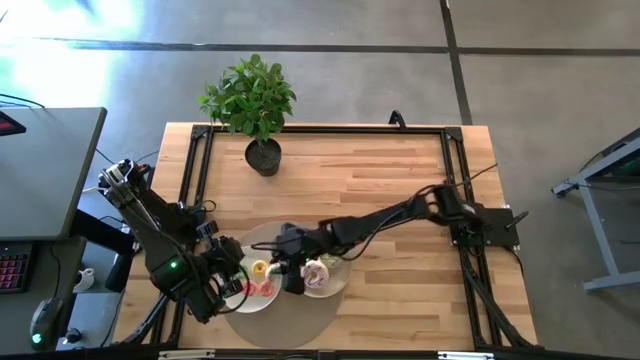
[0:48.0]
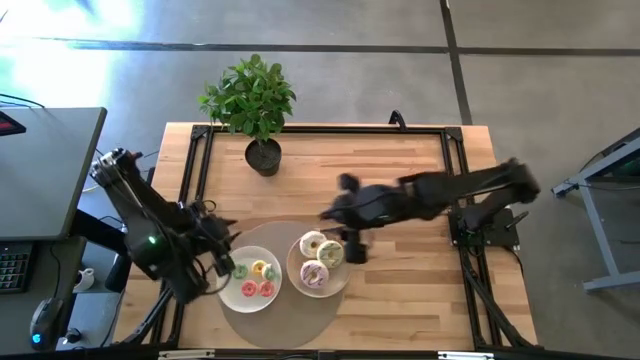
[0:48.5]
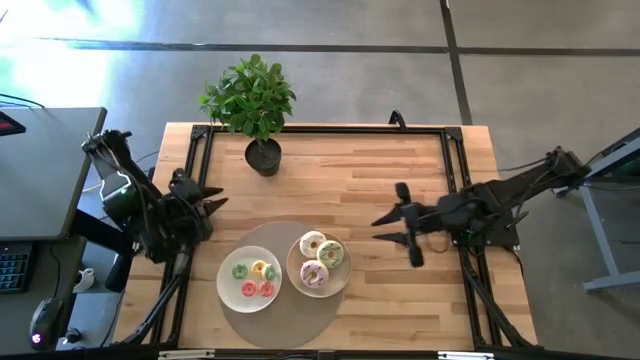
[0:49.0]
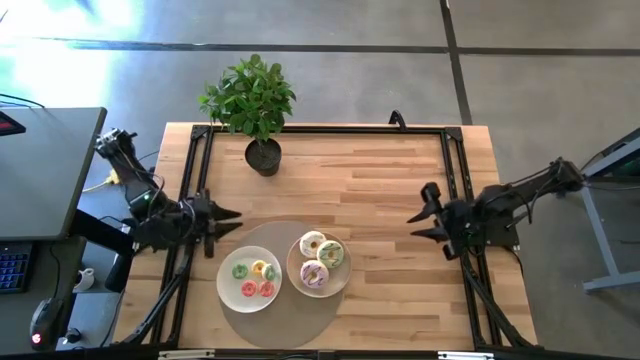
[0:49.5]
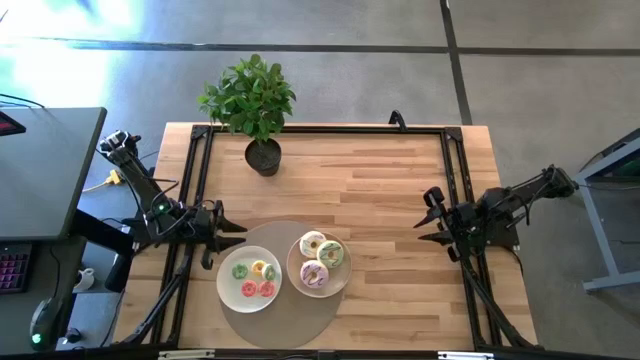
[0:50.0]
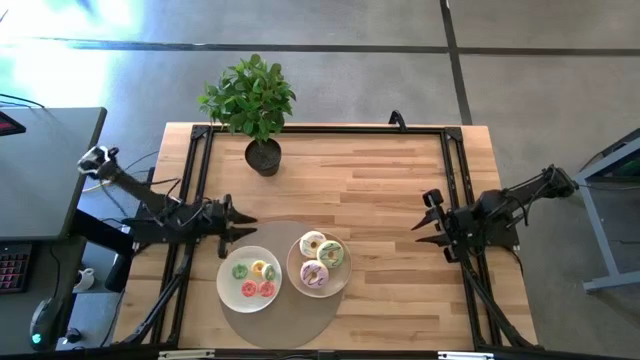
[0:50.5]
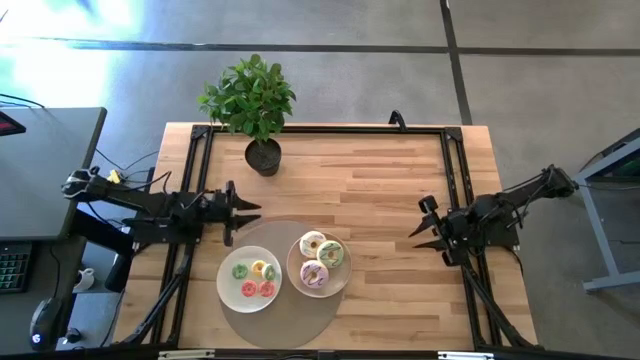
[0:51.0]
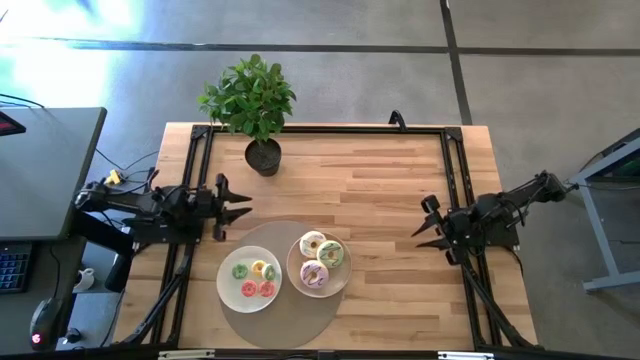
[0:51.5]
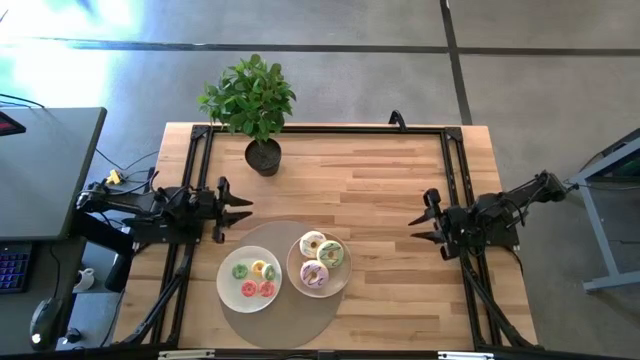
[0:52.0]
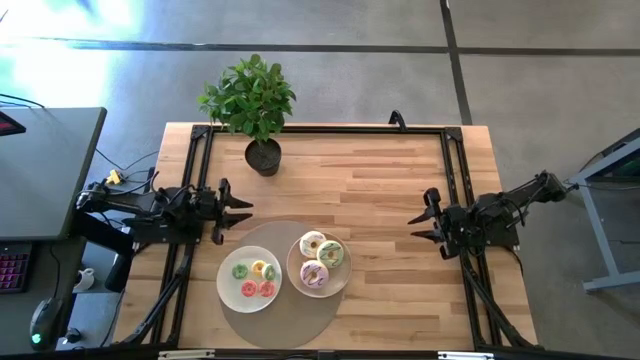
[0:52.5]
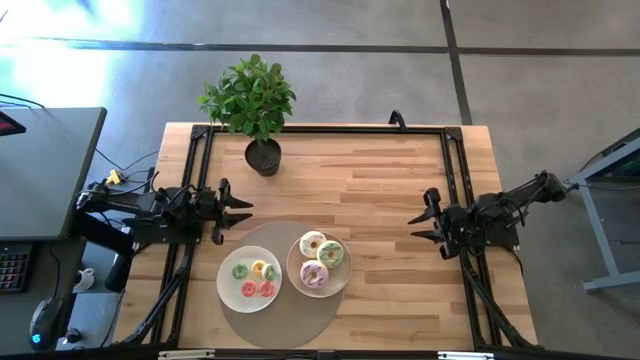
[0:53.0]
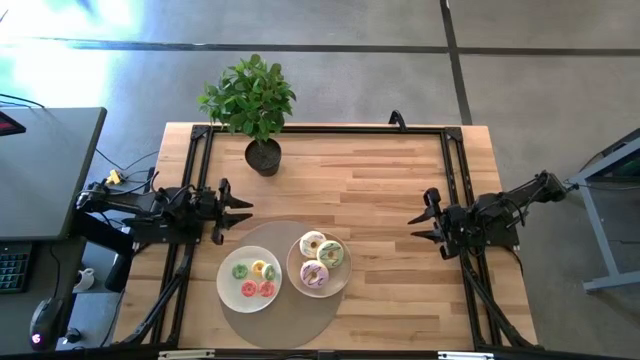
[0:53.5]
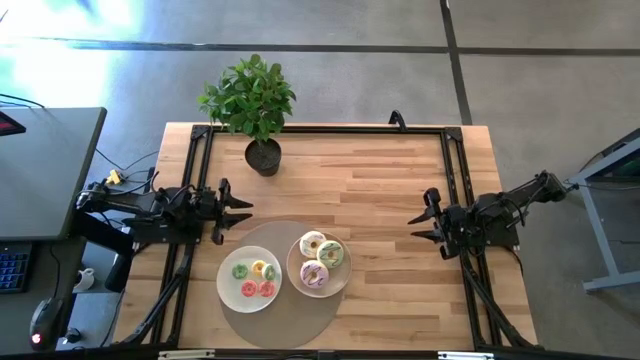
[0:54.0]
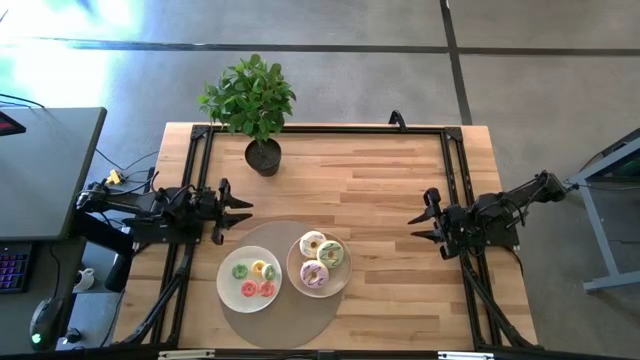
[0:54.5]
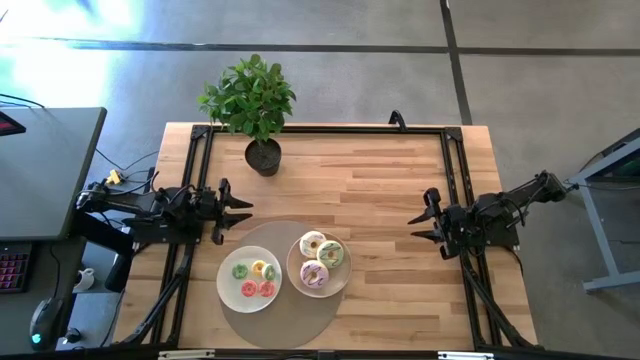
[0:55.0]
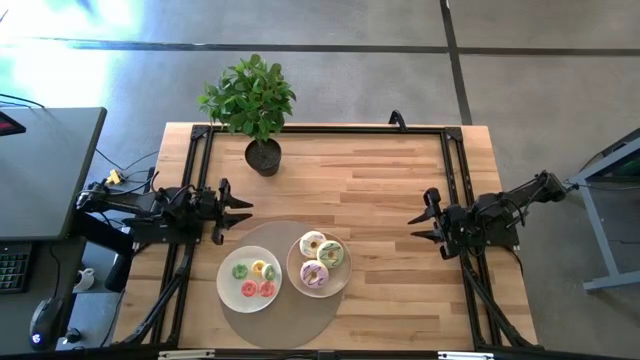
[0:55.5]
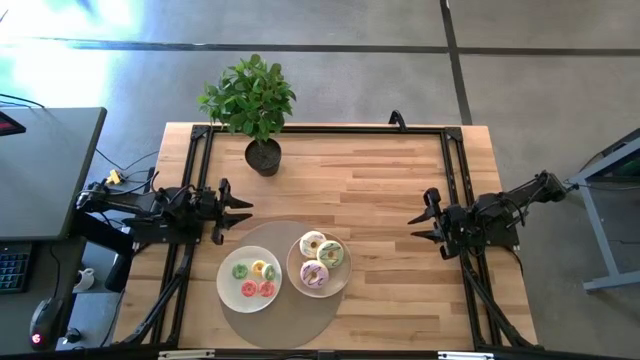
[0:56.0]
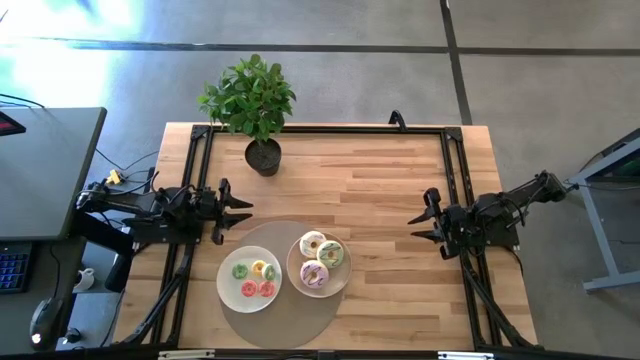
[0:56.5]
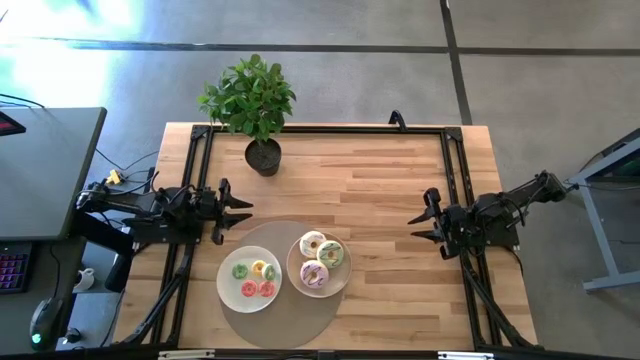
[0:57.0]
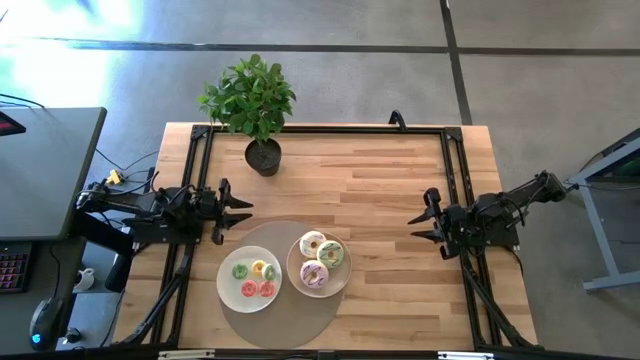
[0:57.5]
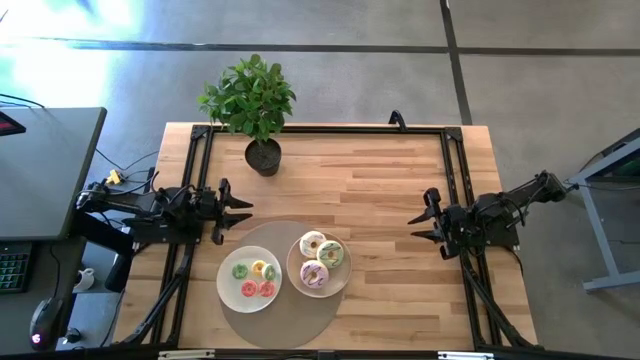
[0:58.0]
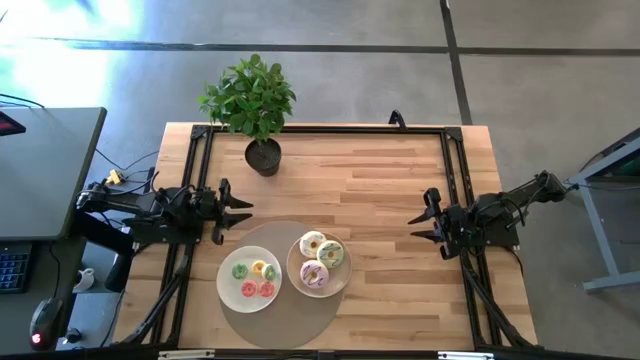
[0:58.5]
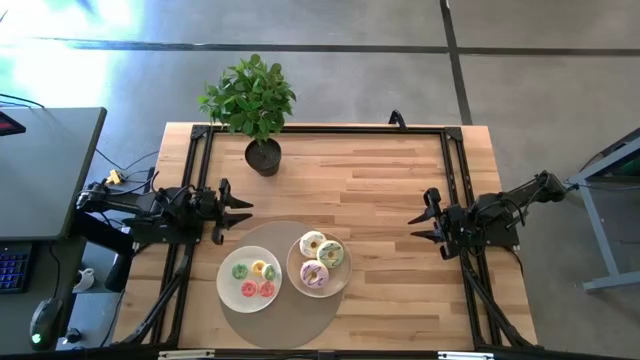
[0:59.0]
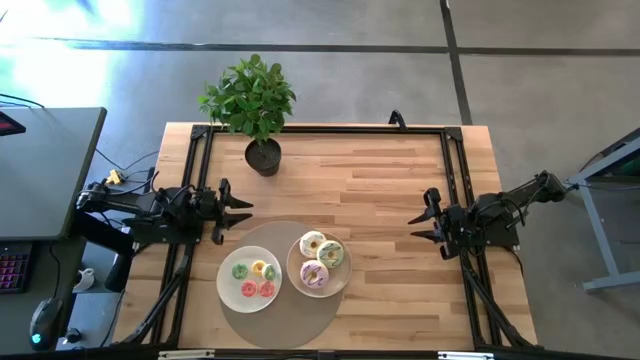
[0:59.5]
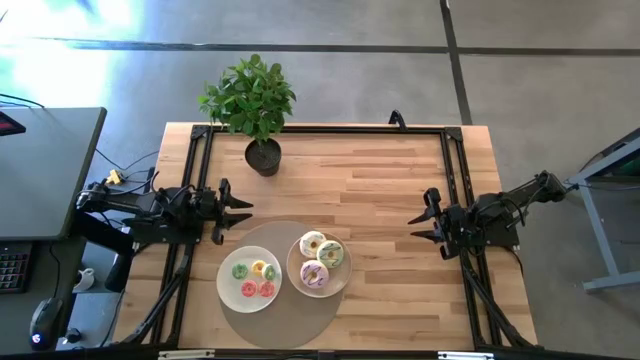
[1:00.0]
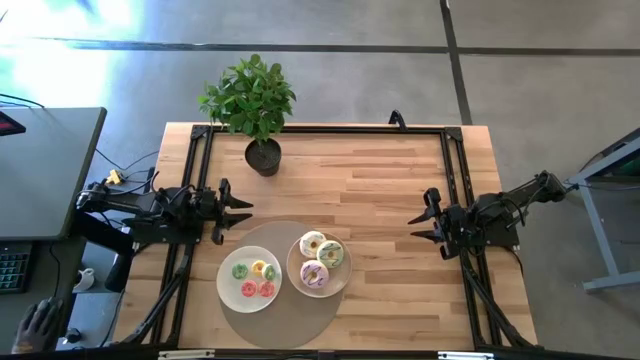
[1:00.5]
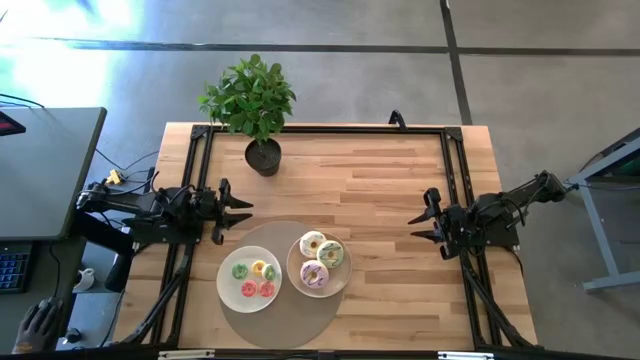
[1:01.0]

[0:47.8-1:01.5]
Task: Pick & Place donuts
Return to Home Position

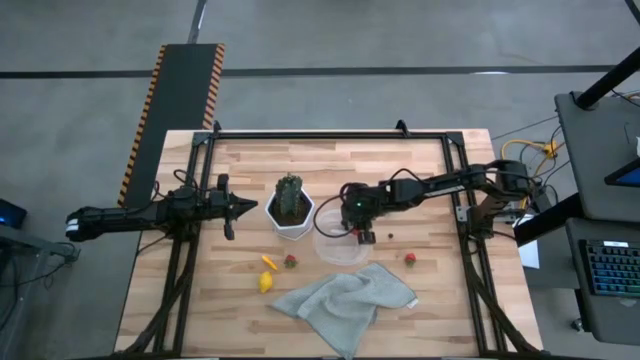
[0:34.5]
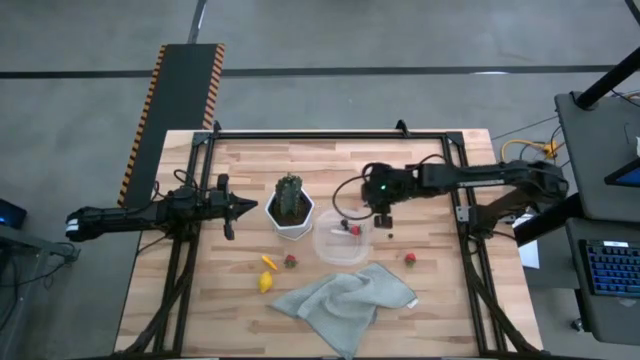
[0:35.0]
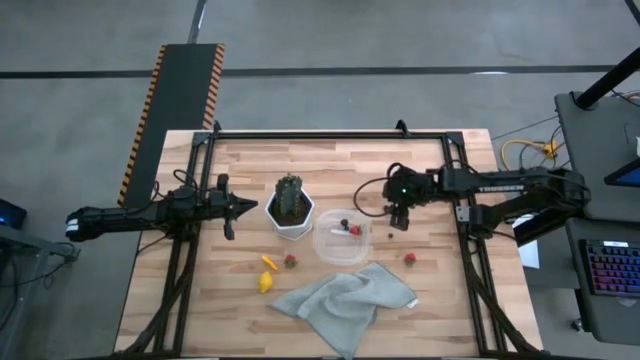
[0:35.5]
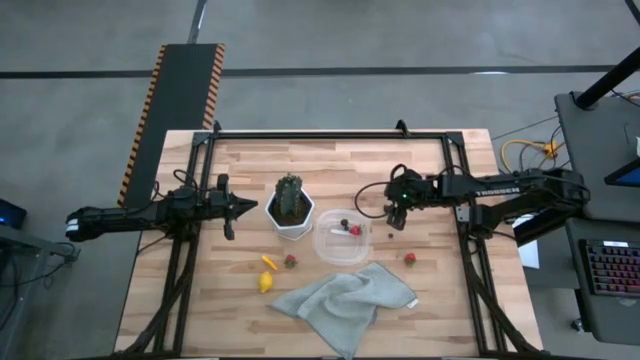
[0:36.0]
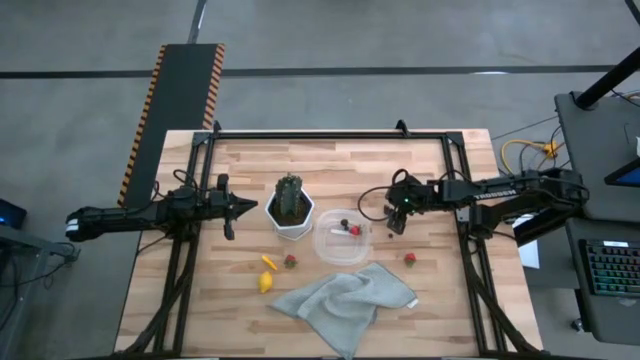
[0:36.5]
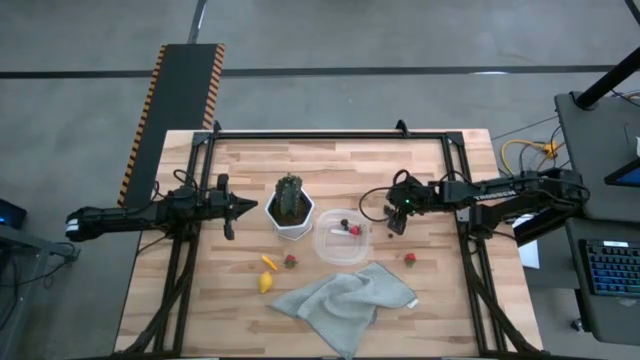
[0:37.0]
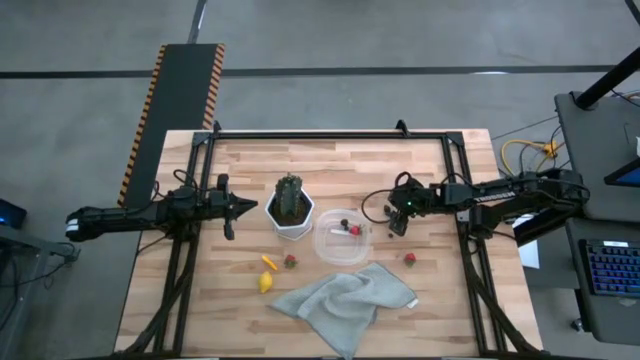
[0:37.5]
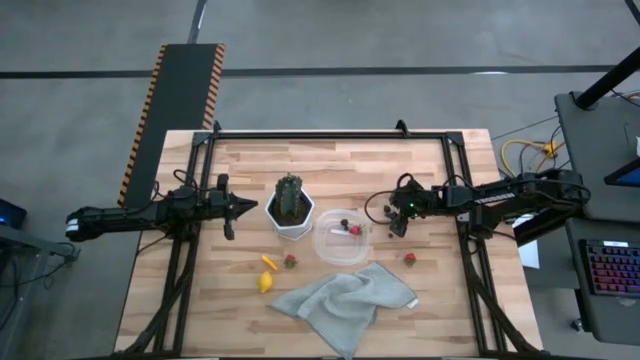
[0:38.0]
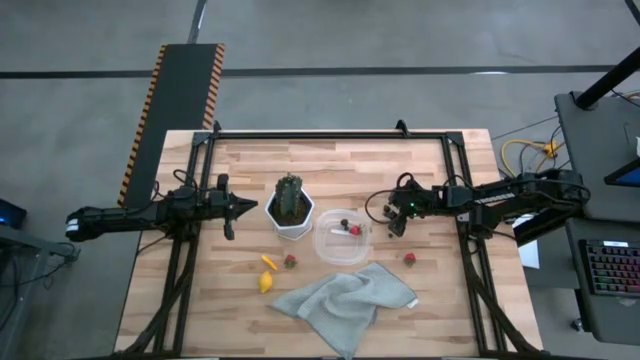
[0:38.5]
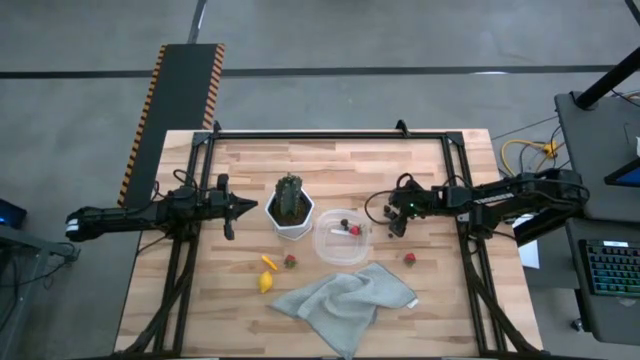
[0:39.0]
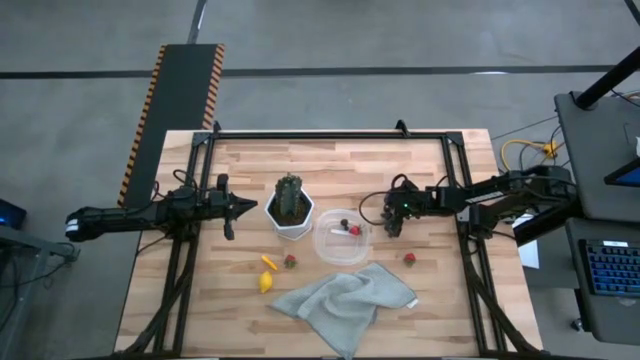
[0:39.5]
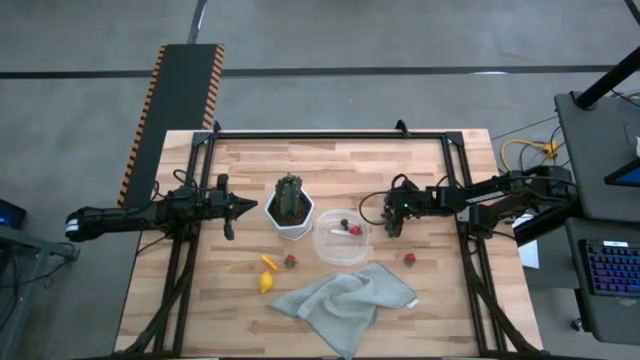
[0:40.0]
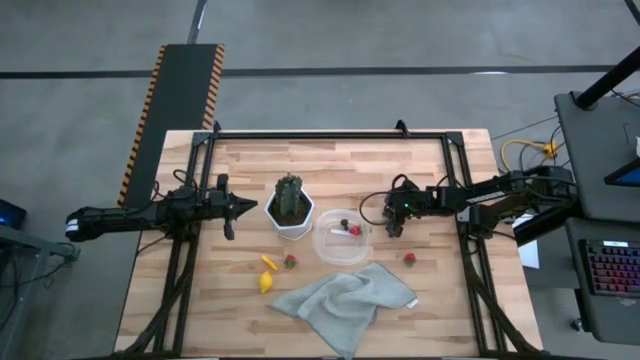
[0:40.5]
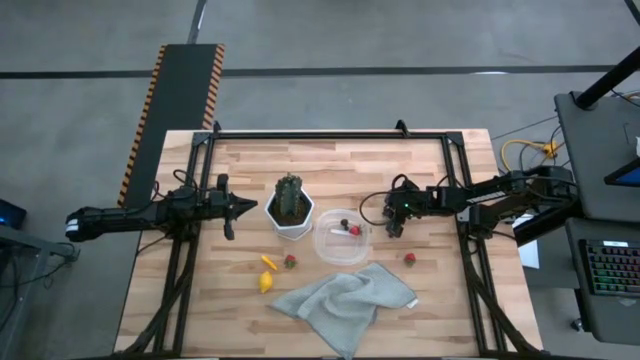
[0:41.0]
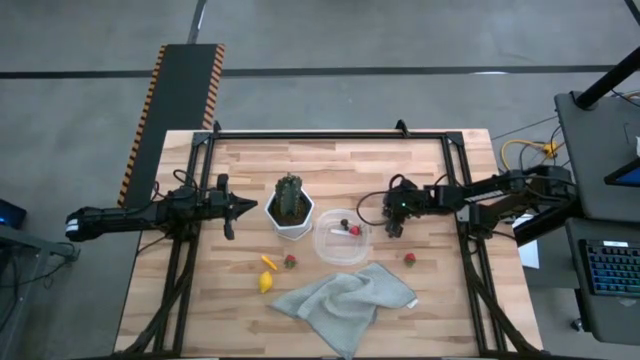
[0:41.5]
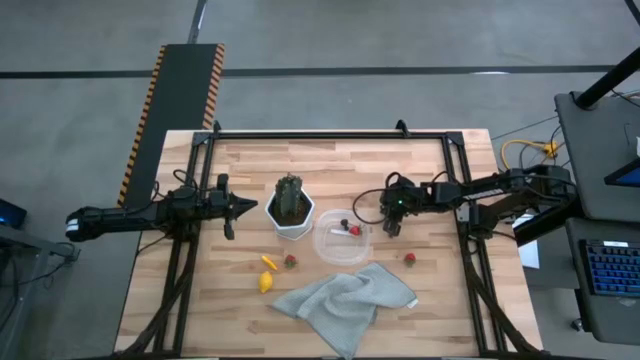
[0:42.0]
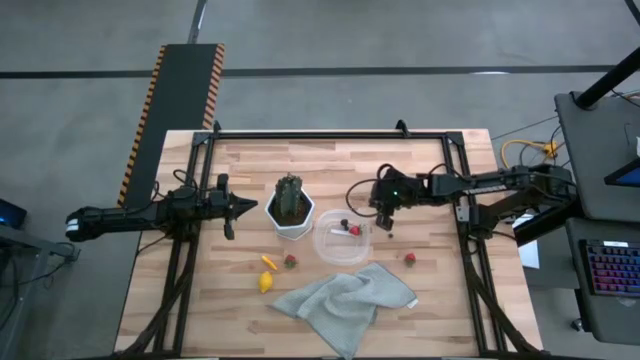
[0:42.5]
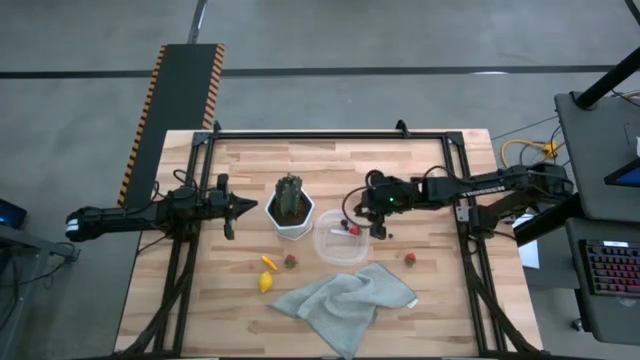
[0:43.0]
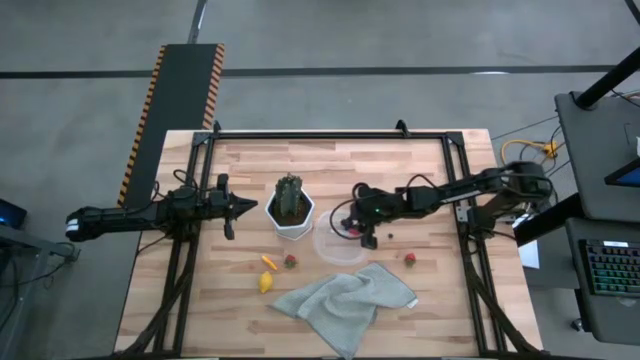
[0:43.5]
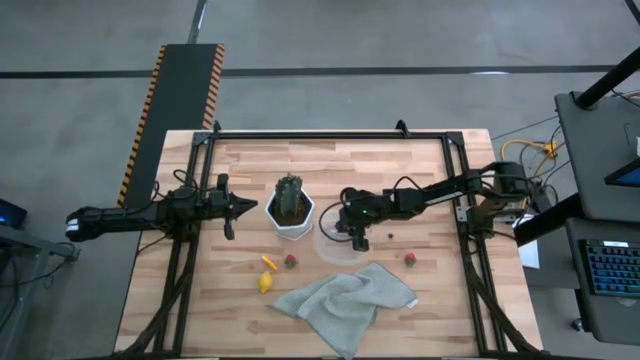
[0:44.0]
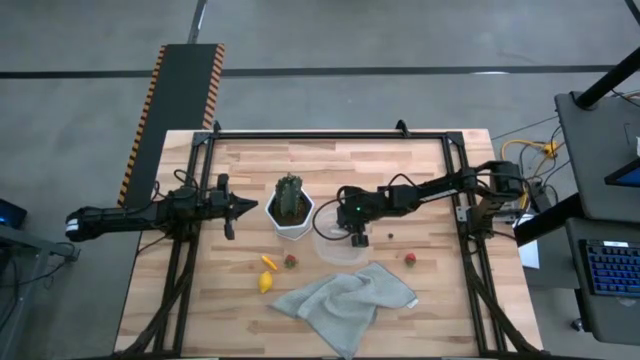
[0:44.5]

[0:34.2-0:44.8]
Task: Pick and placing Produce into tupperware
Put the blackberry into the transparent bin
